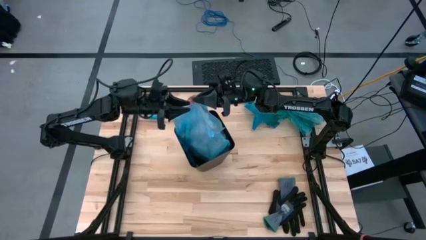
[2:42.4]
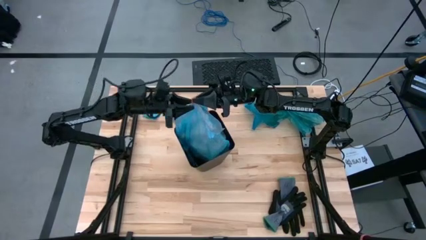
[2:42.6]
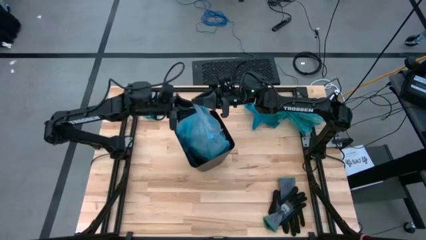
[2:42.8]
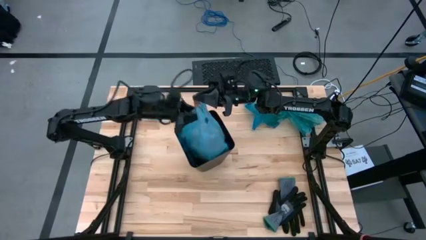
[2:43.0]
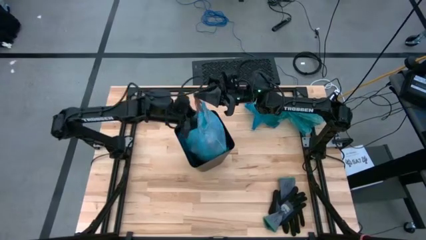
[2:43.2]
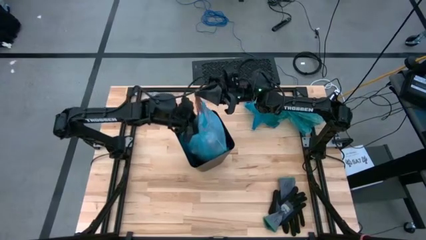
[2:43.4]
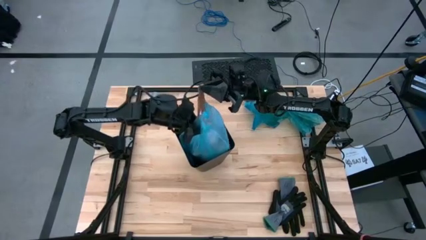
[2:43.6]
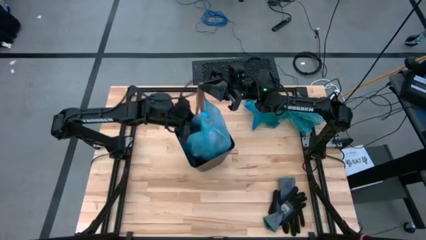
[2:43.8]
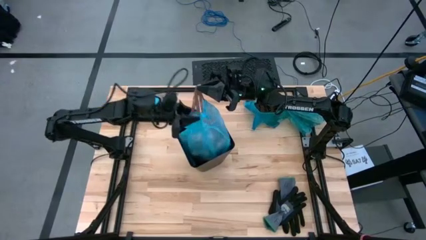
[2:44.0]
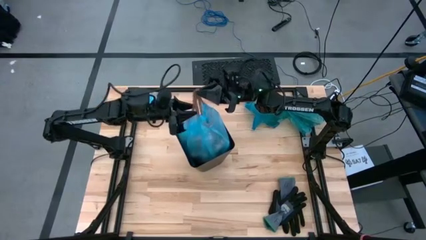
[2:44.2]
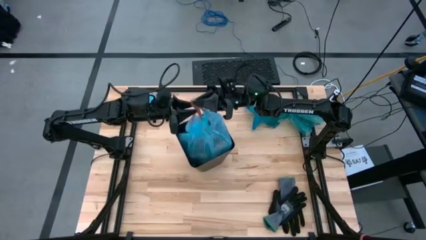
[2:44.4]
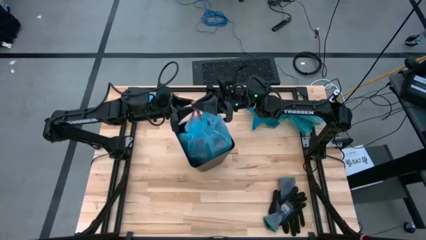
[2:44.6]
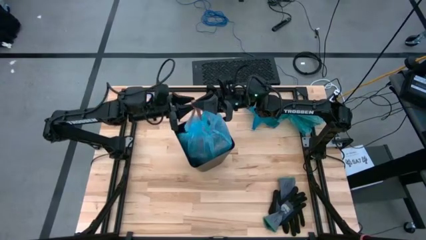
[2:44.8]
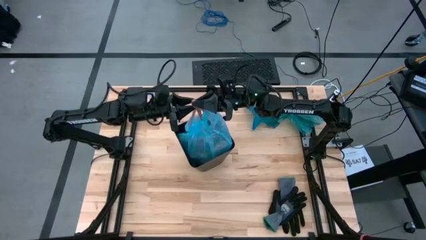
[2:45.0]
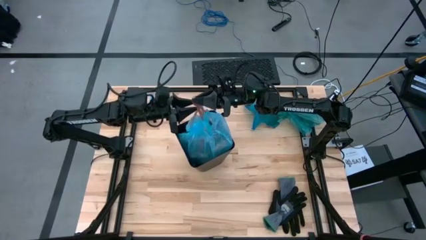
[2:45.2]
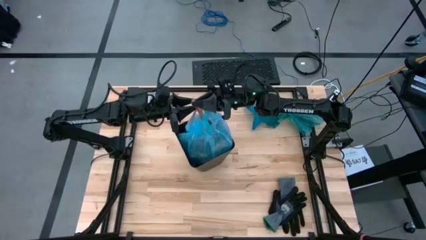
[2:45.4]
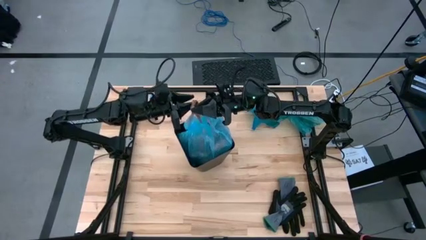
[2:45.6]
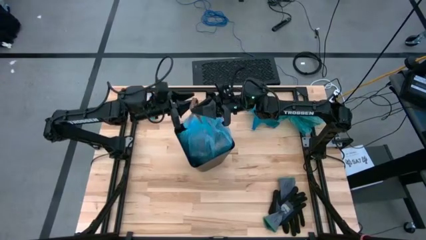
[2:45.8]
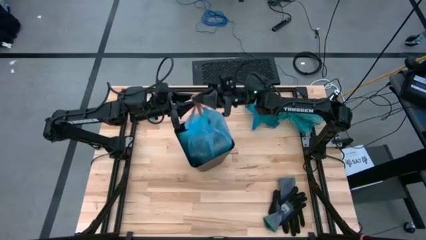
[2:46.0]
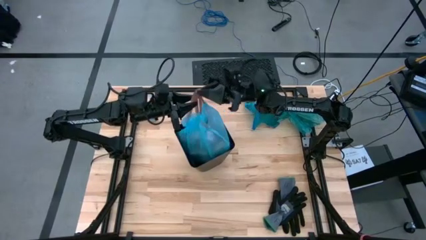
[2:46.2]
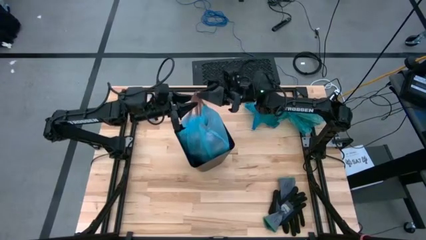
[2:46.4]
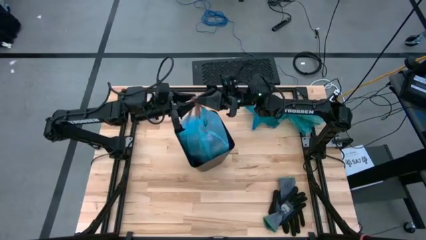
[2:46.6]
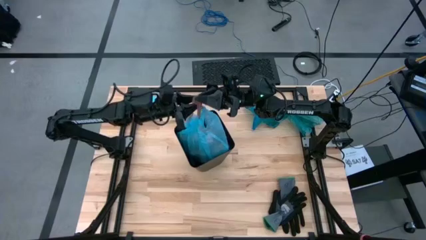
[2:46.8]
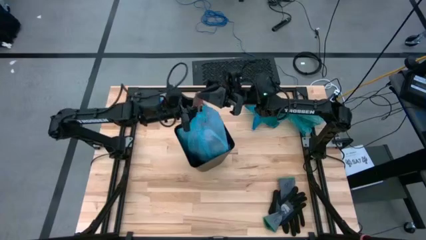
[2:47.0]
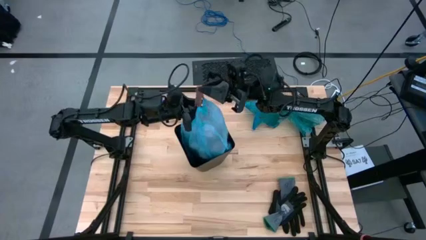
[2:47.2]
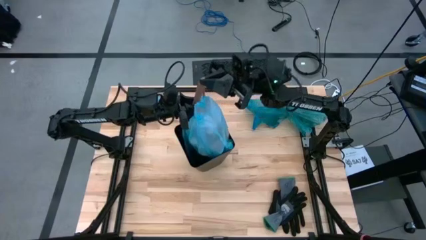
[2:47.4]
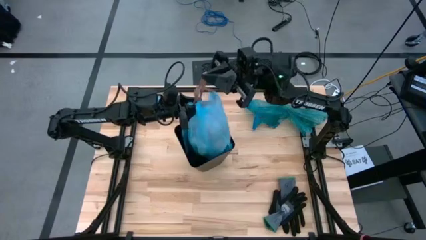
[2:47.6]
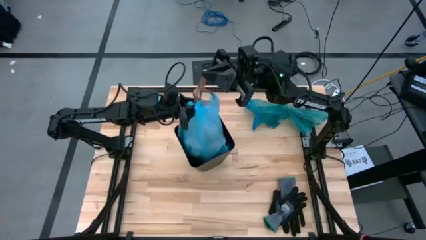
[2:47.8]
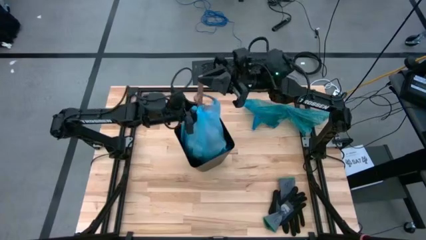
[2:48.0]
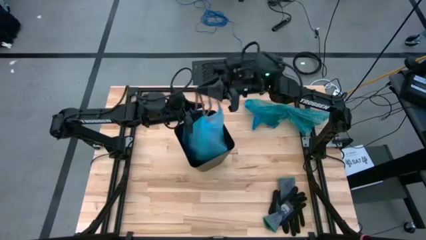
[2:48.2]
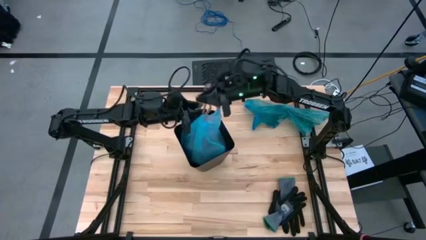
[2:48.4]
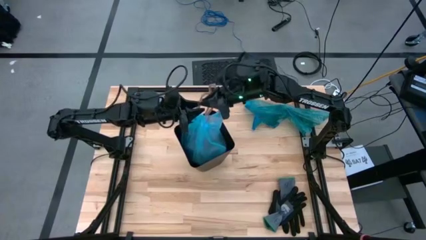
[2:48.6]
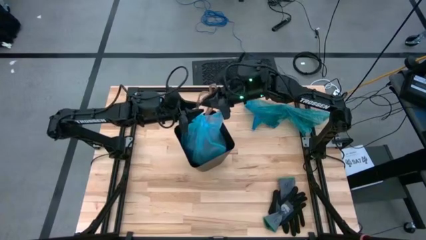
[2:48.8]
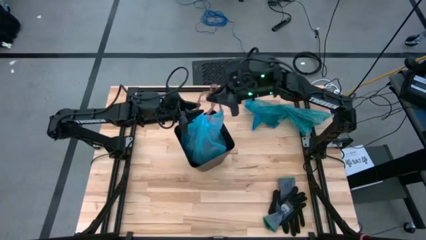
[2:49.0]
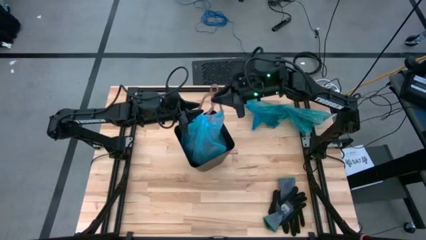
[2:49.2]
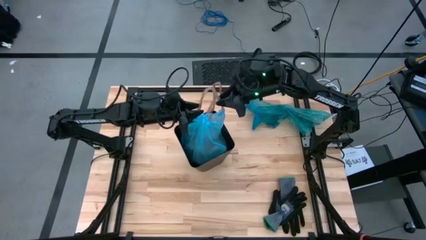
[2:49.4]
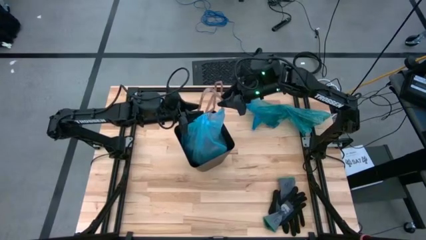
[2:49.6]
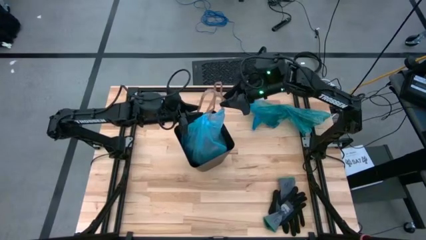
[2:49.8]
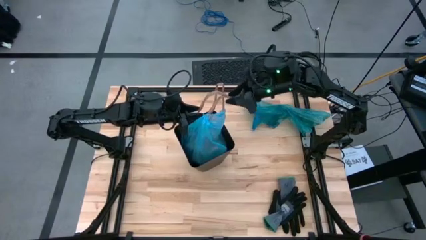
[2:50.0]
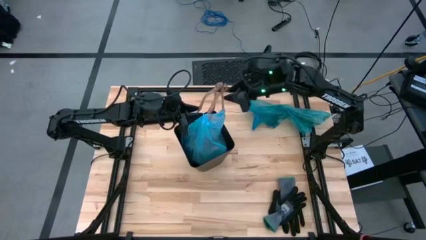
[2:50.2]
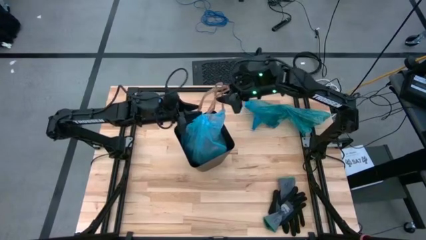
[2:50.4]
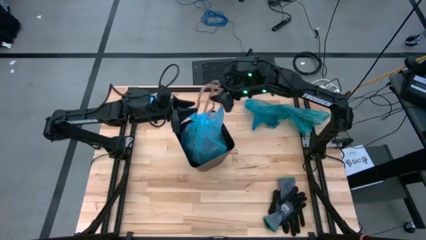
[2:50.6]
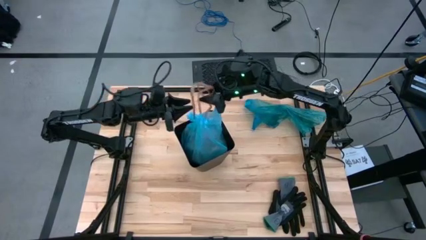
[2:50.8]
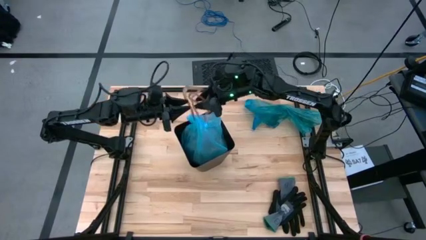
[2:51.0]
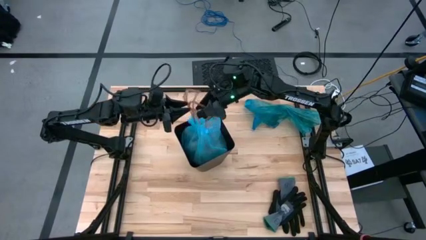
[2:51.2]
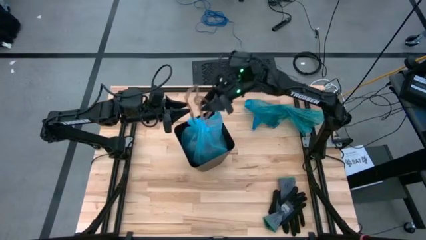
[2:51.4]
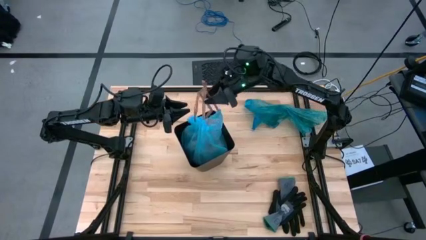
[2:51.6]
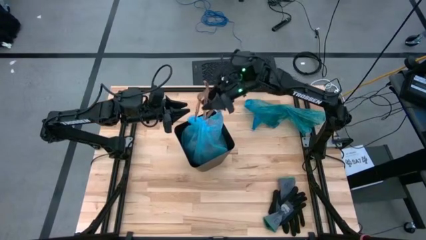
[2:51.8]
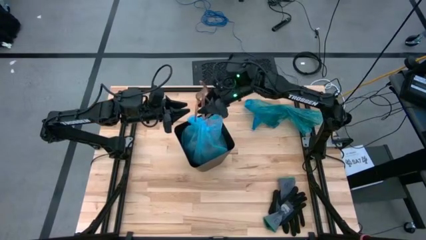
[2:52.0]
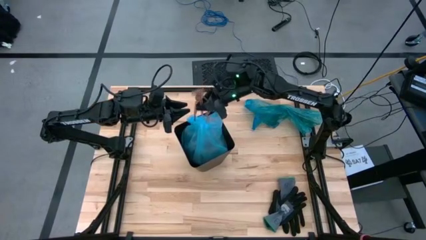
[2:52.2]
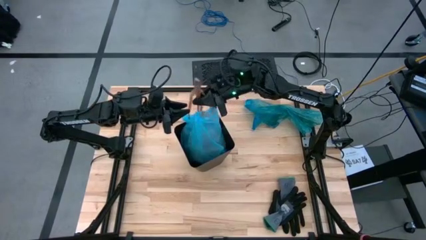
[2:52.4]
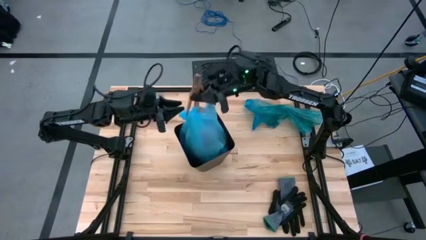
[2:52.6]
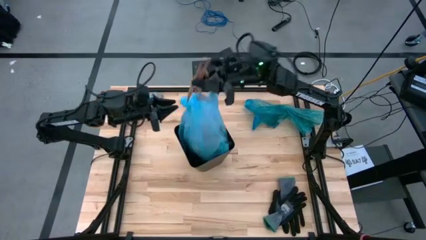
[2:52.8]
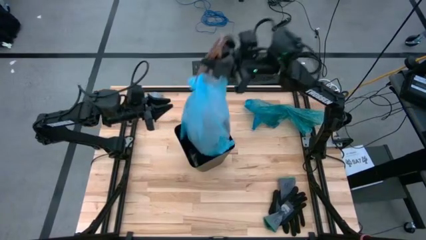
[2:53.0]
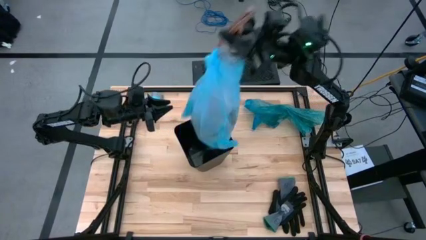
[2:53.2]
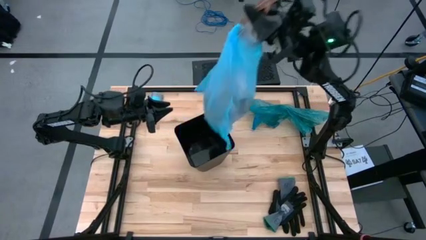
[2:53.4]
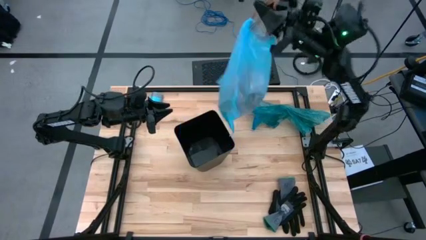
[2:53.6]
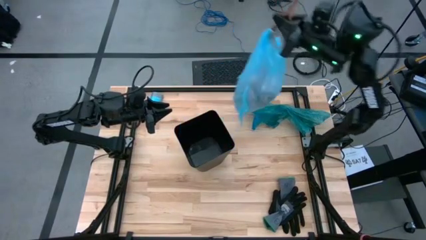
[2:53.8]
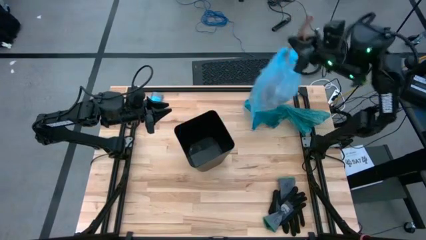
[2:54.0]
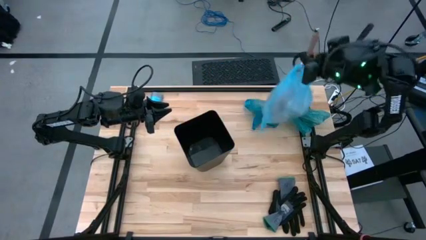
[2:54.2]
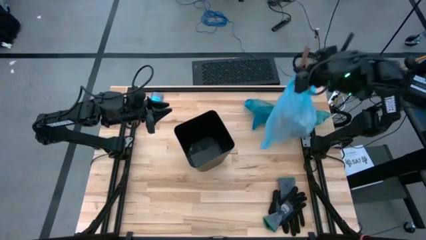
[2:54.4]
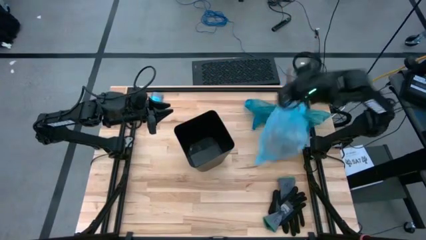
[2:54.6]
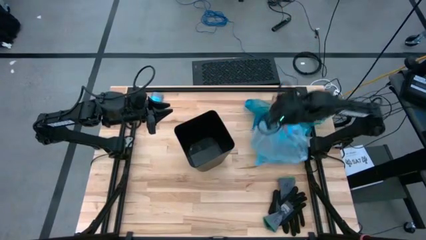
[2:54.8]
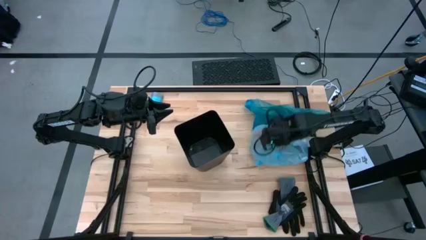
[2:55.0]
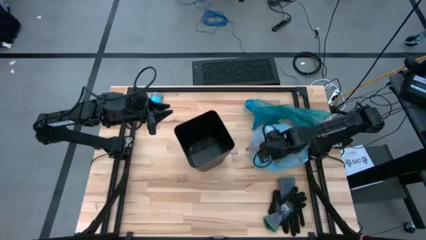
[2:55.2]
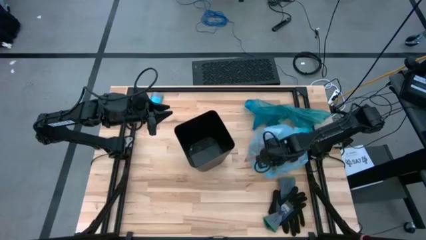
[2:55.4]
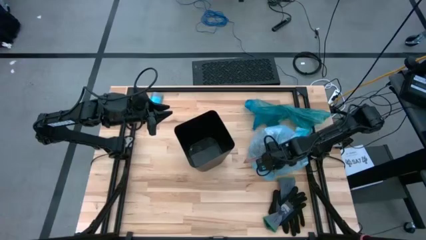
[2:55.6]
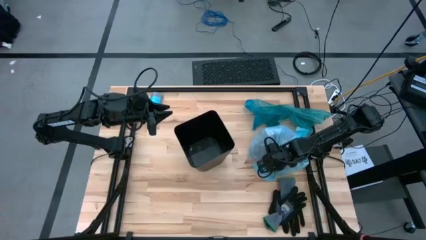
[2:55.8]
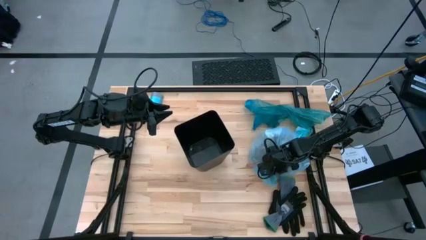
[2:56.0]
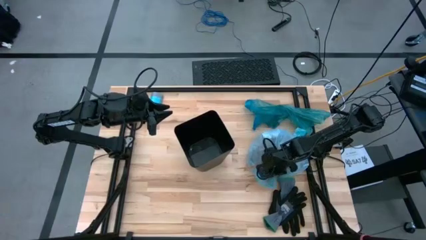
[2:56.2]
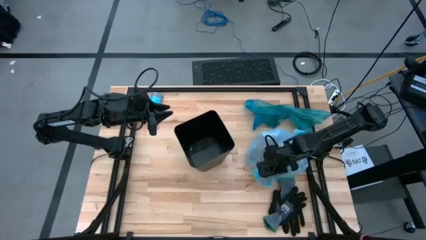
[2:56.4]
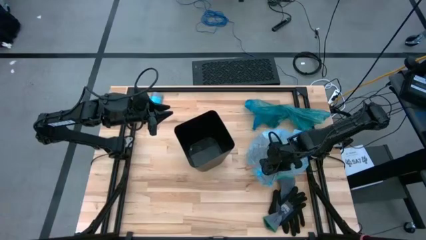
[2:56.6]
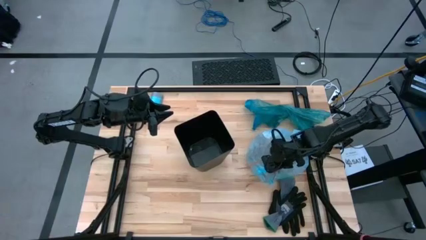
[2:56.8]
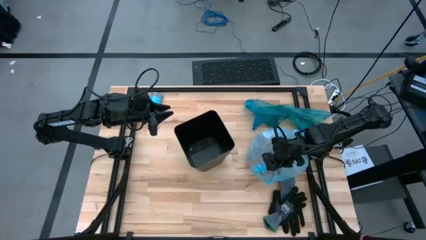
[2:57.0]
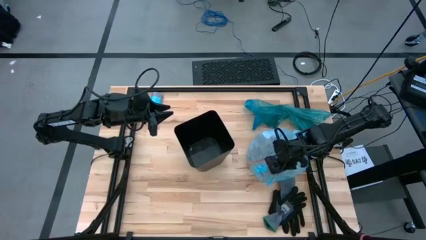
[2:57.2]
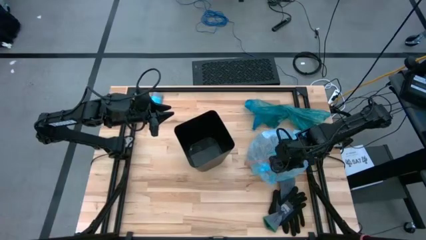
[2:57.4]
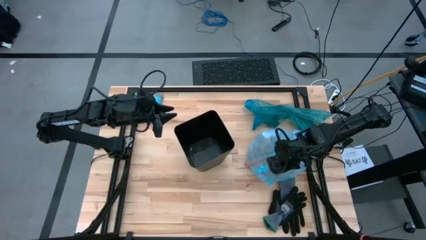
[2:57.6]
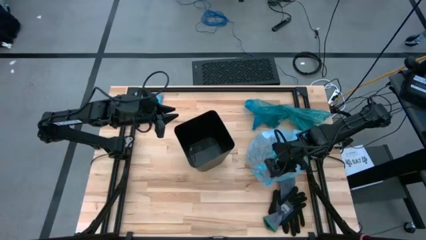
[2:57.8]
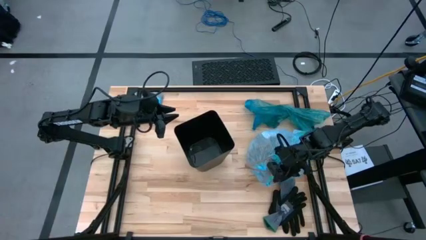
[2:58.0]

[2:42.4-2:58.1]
Task: place trash/remove bag and relplace
Remove the blue trash bag from the trash bin
